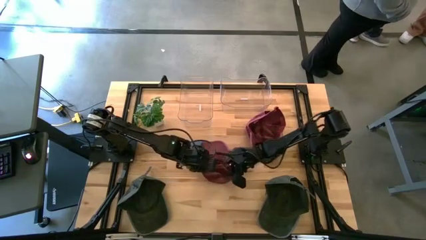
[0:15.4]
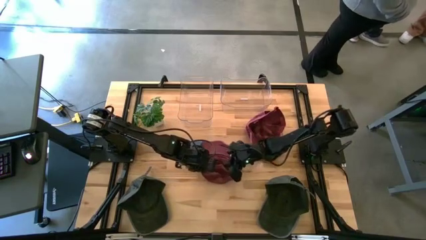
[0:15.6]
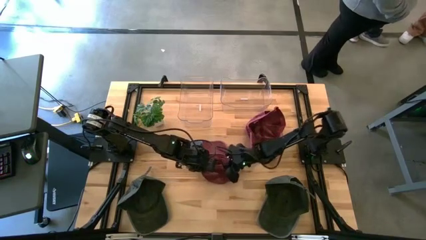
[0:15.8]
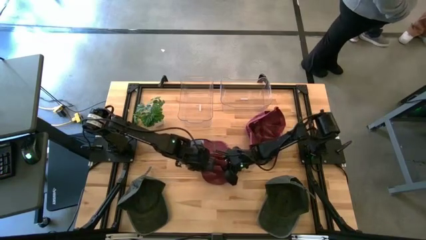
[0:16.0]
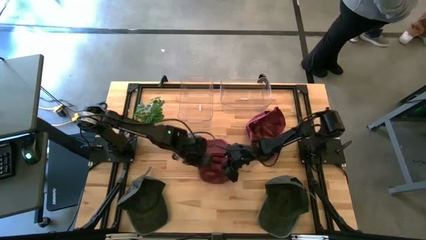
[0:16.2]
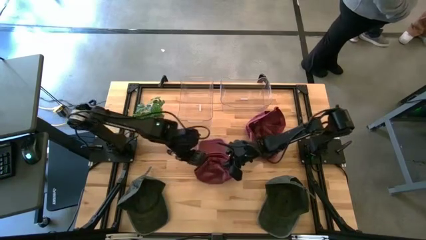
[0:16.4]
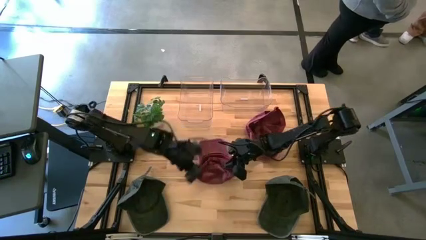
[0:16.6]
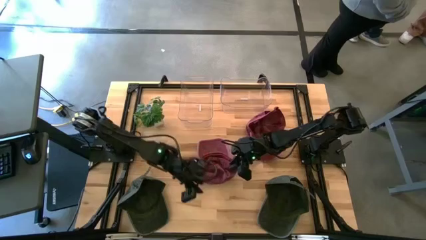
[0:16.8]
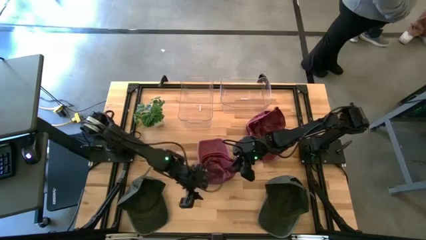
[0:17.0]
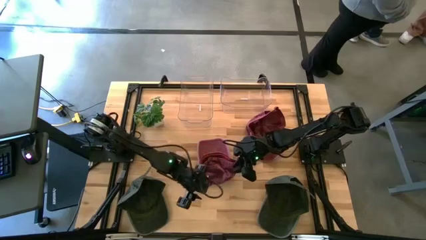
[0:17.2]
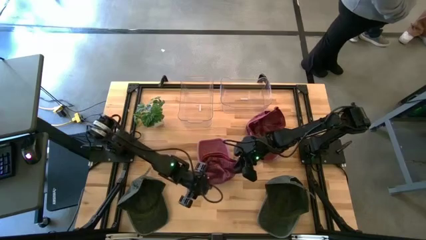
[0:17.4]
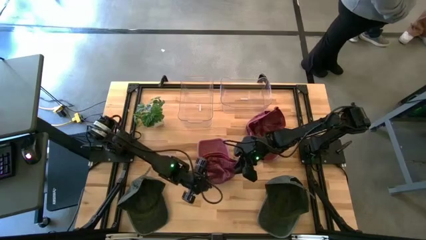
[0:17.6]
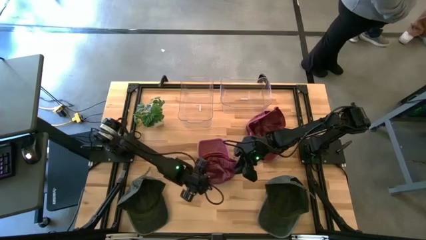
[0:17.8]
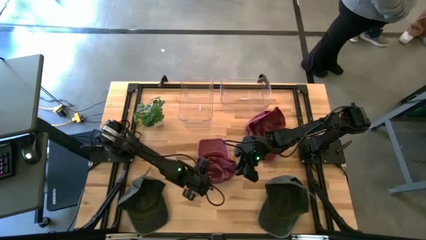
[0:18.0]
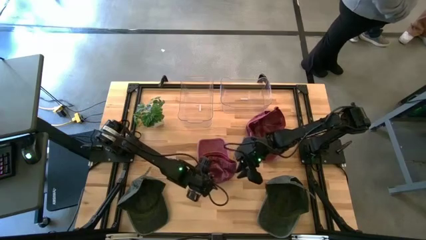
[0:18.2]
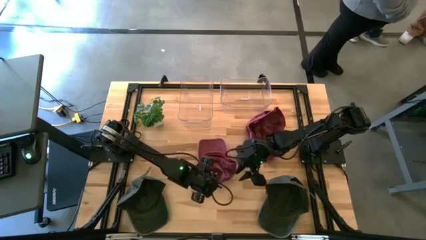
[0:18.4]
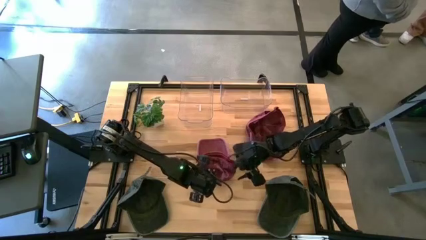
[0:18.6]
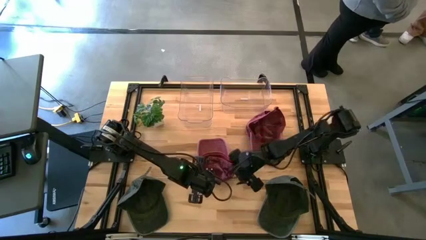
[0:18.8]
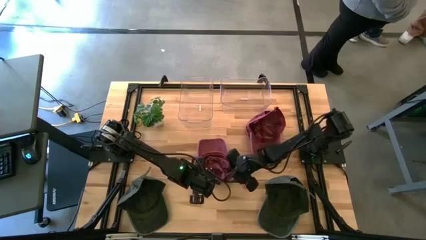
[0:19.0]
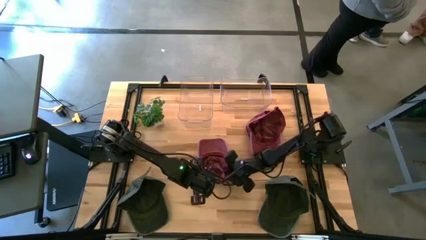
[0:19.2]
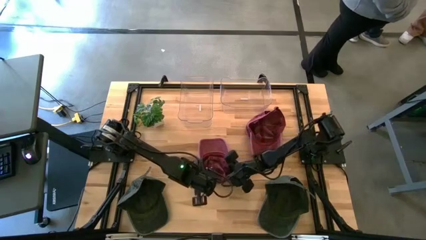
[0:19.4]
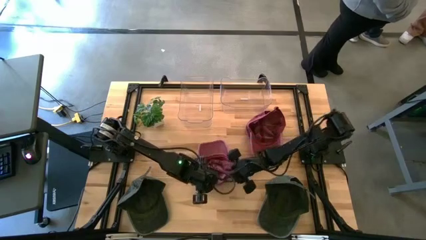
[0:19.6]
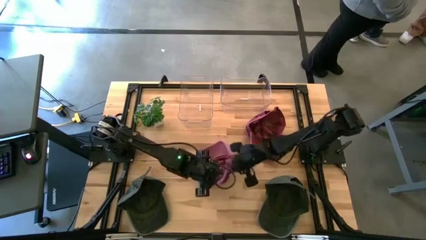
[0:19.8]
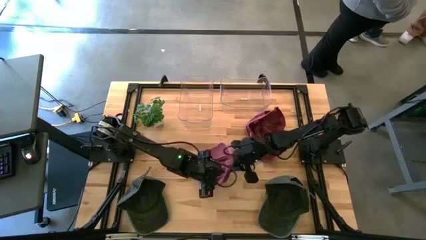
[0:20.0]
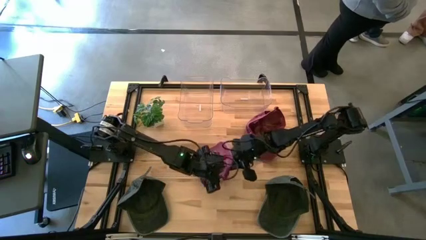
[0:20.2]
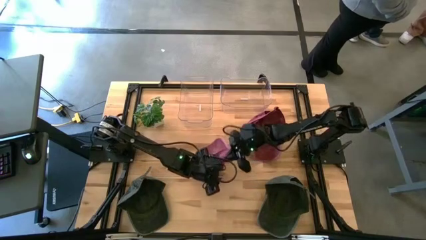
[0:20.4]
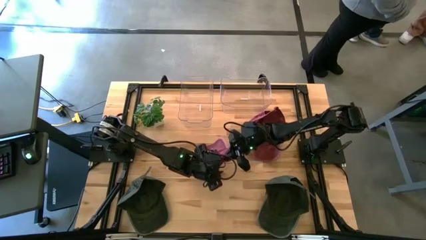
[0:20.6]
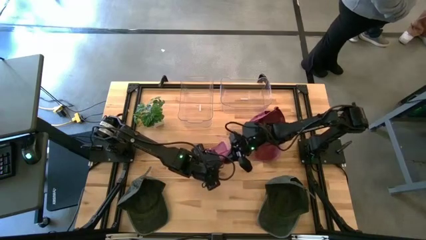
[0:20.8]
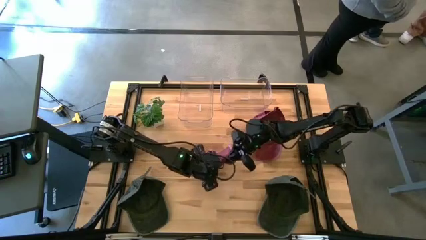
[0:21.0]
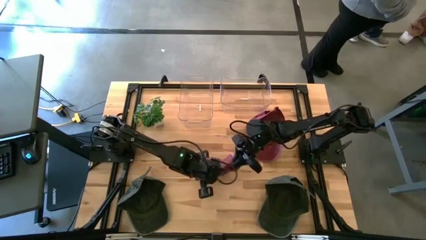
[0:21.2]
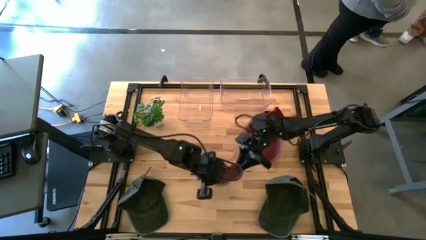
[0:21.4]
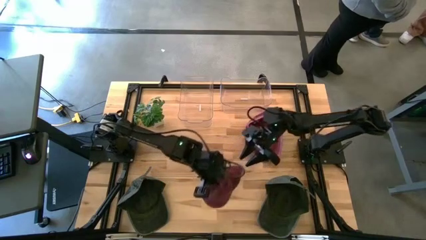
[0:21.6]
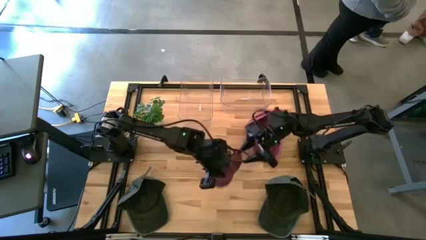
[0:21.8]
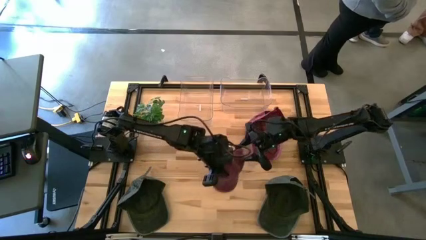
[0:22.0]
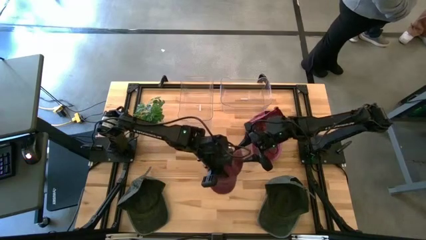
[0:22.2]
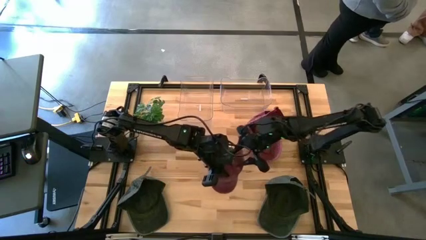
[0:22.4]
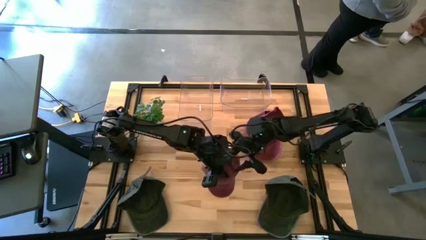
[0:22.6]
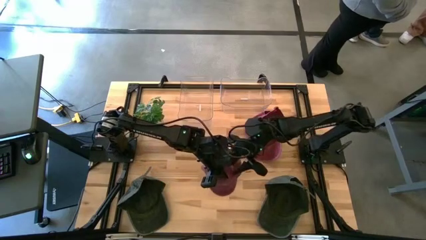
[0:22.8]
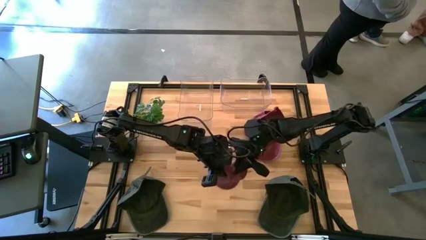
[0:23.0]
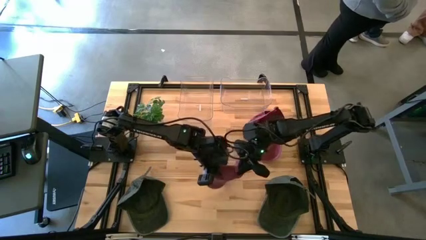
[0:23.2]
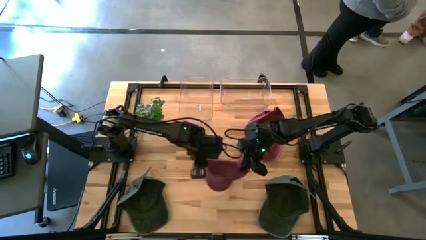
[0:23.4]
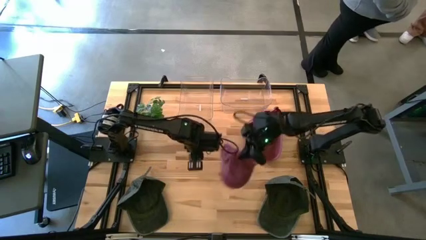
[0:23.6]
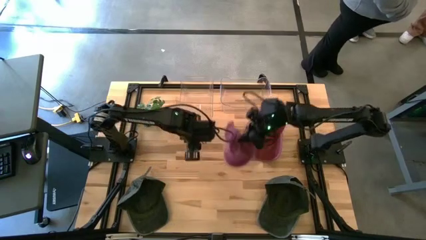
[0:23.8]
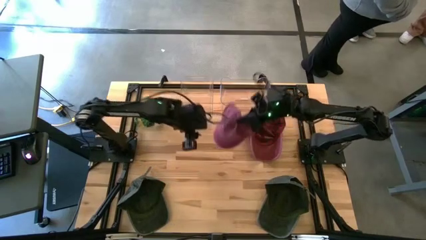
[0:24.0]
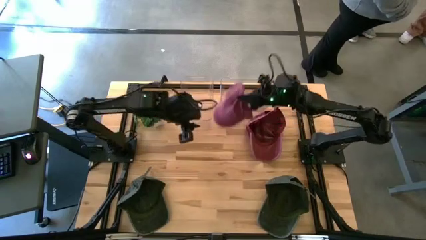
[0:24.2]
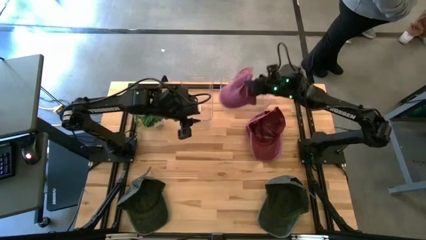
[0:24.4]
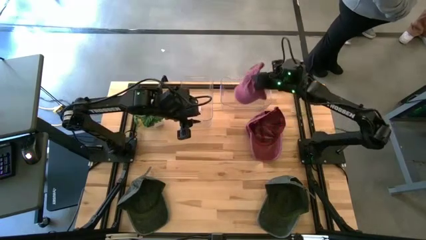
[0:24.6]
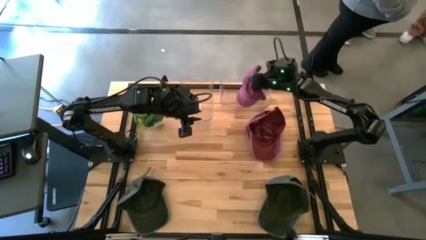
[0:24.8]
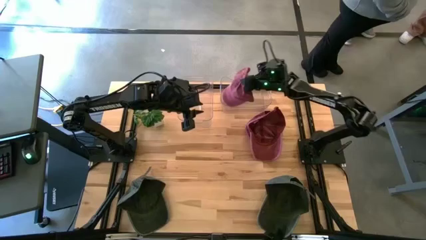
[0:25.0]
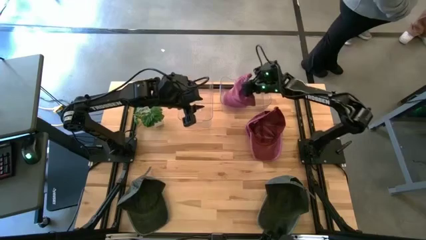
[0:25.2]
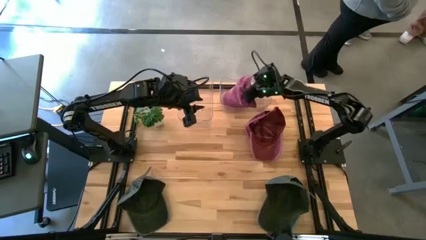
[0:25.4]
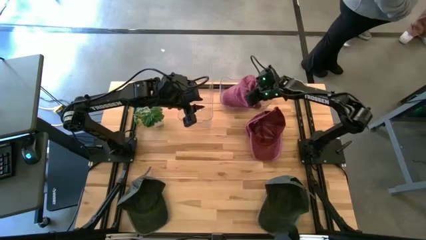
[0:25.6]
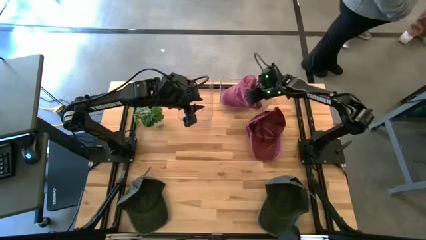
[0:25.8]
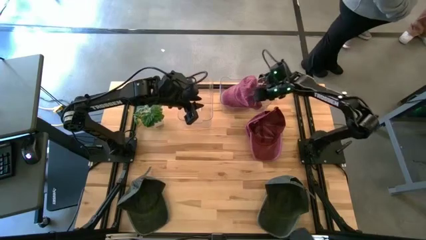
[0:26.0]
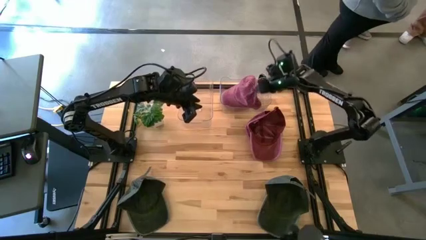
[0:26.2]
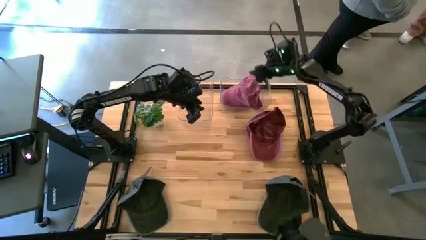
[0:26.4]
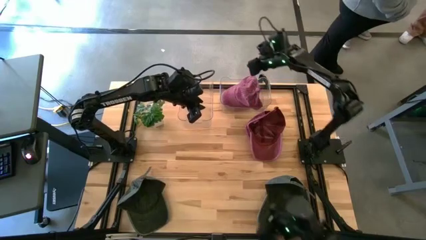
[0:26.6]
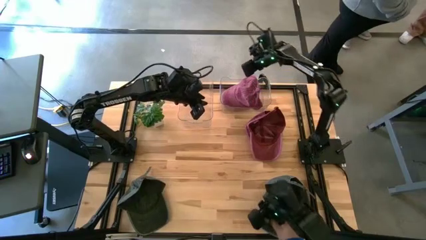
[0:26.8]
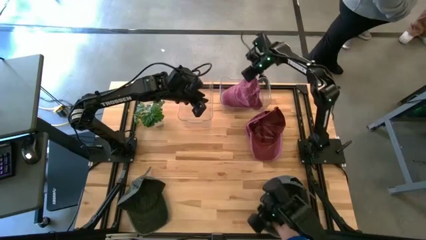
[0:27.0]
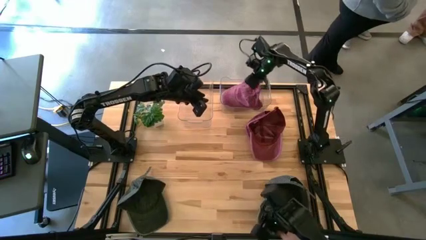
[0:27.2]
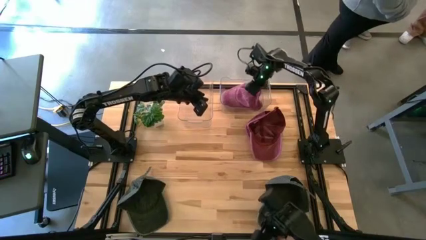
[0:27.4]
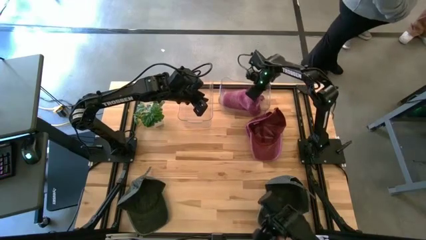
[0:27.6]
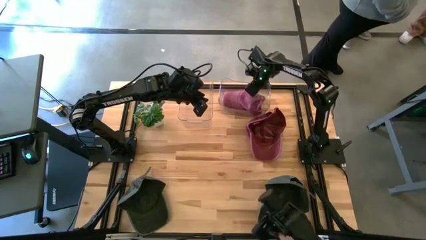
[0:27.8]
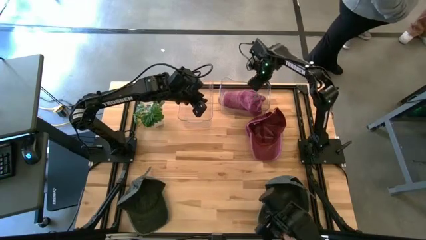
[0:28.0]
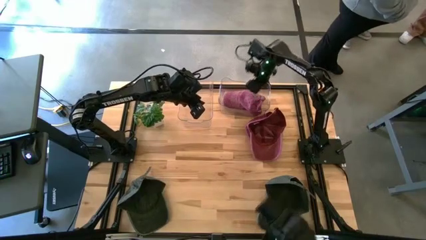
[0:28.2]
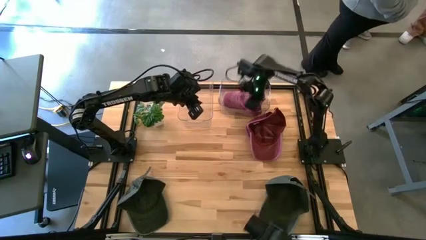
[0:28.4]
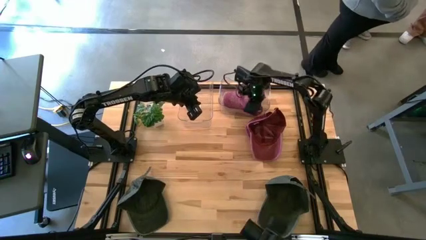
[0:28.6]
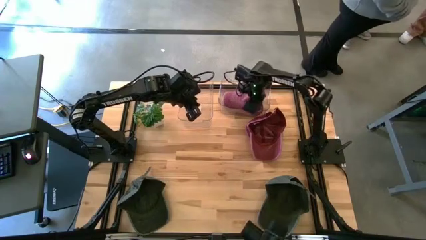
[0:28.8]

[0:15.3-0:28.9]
Task: Pick & Place hat
Put the left red cap into the right transparent bin

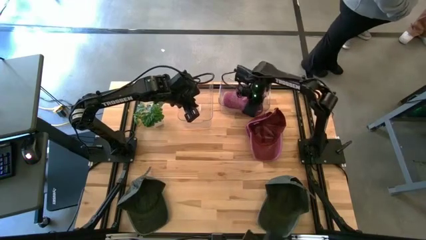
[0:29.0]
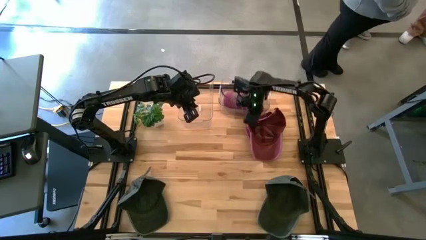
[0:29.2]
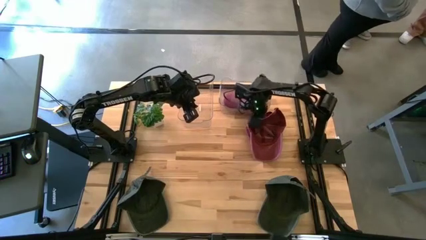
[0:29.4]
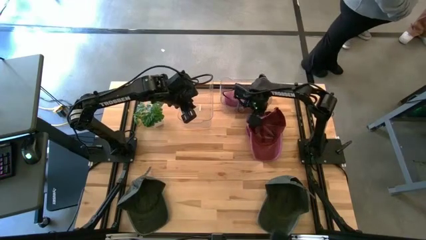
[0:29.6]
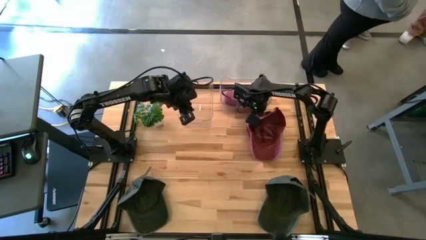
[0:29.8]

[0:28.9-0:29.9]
Adjust the right transparent bin
